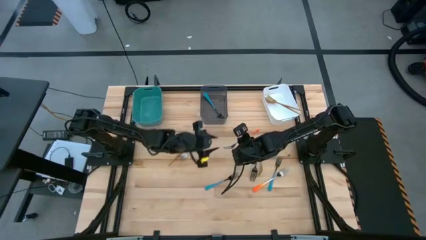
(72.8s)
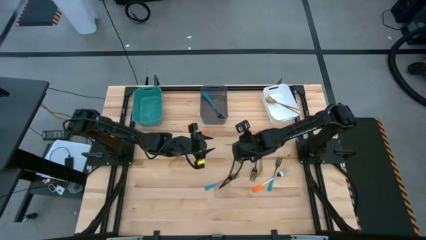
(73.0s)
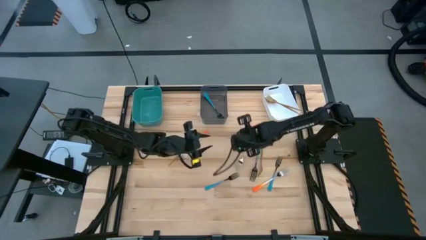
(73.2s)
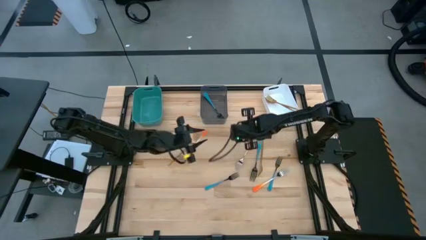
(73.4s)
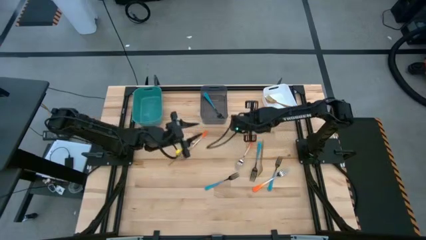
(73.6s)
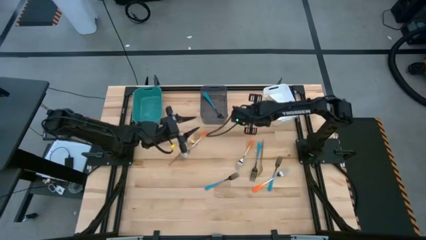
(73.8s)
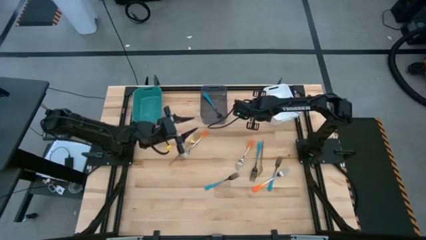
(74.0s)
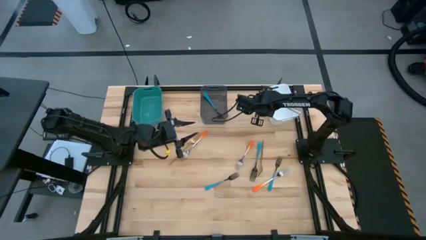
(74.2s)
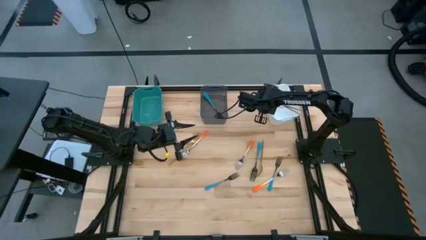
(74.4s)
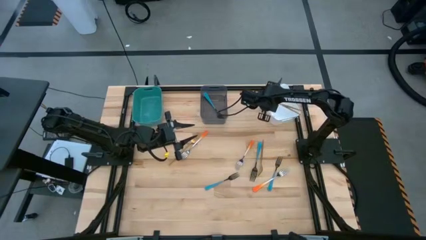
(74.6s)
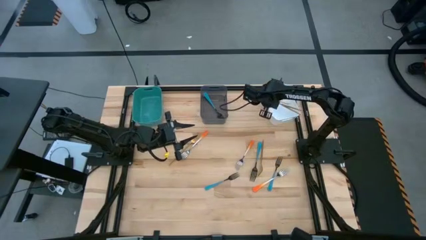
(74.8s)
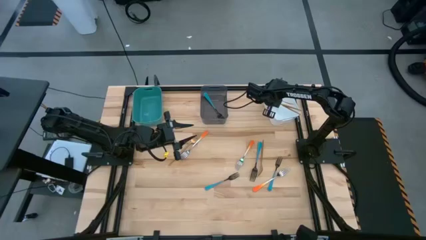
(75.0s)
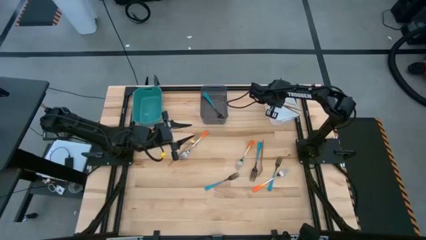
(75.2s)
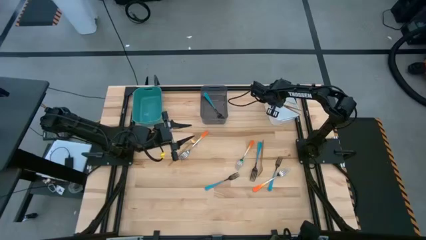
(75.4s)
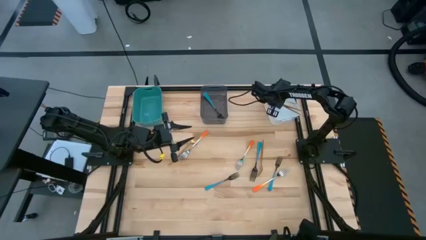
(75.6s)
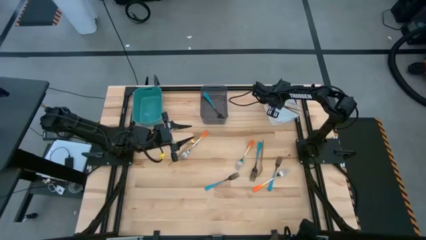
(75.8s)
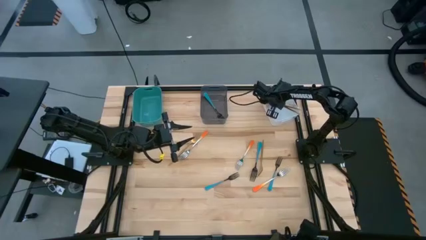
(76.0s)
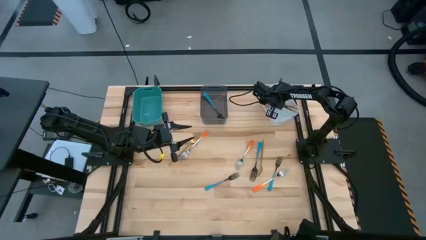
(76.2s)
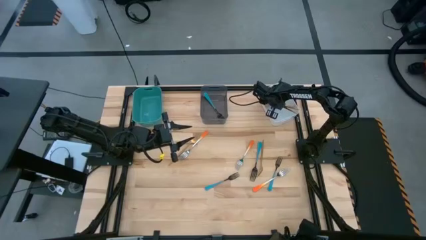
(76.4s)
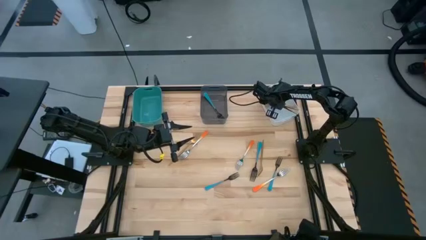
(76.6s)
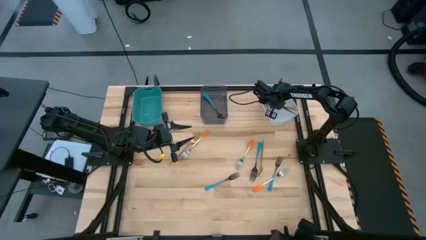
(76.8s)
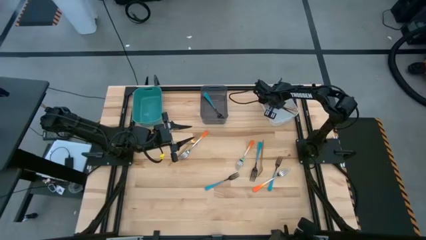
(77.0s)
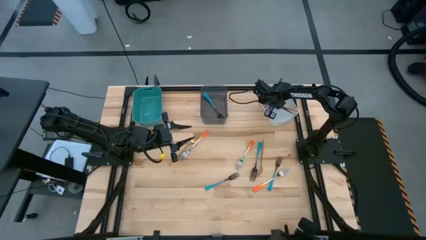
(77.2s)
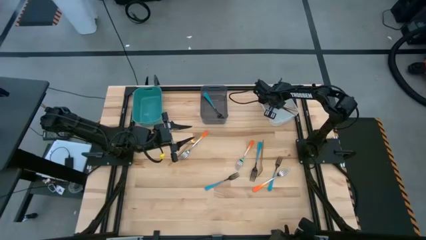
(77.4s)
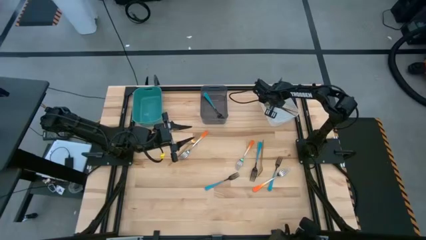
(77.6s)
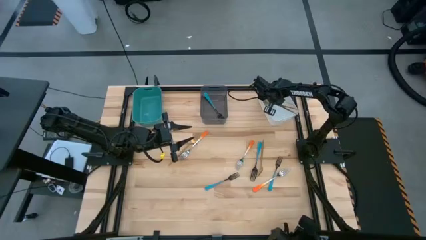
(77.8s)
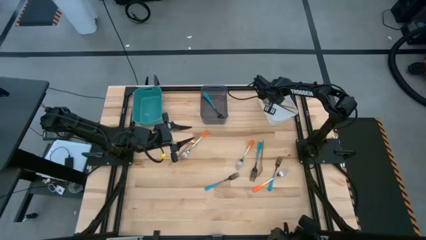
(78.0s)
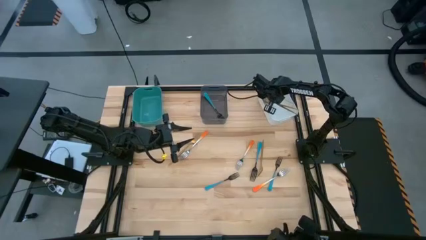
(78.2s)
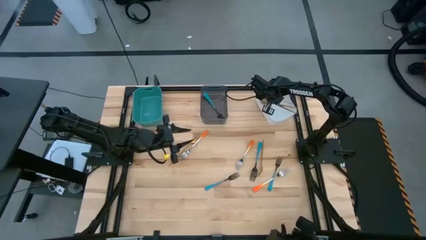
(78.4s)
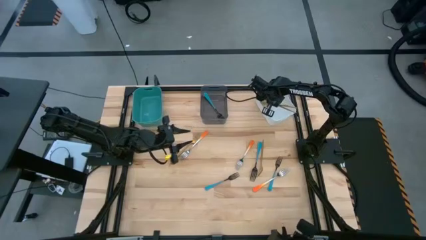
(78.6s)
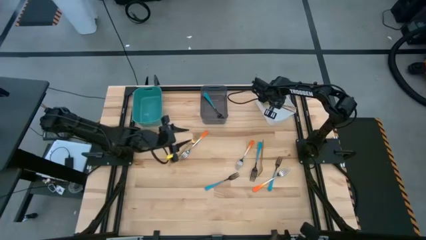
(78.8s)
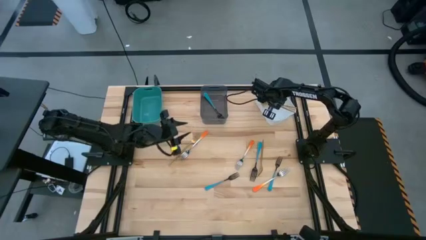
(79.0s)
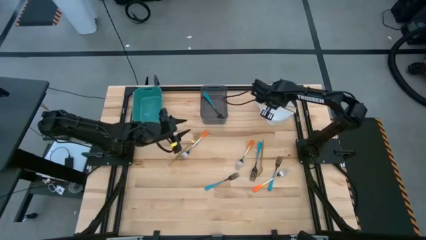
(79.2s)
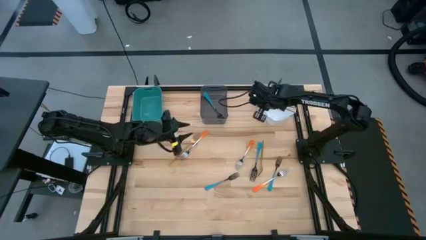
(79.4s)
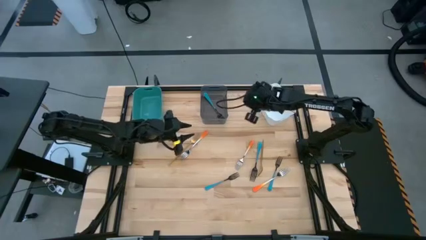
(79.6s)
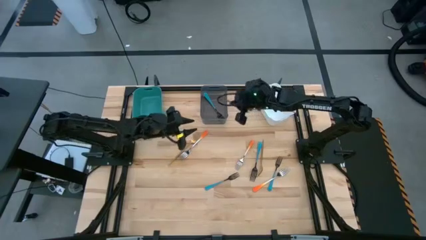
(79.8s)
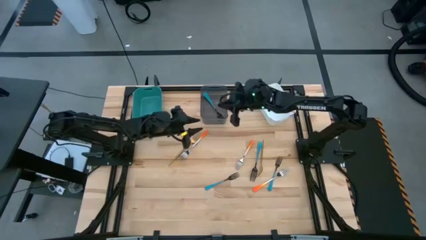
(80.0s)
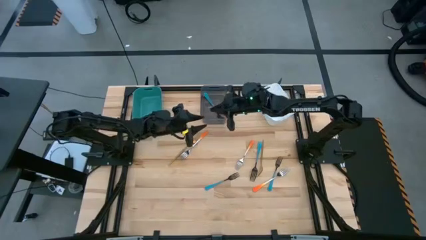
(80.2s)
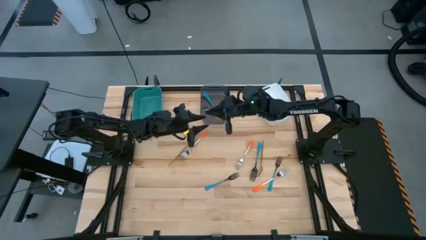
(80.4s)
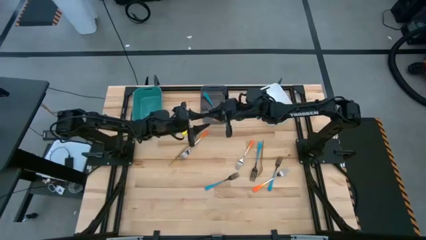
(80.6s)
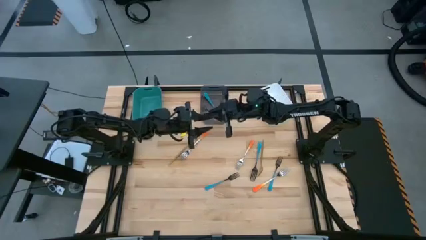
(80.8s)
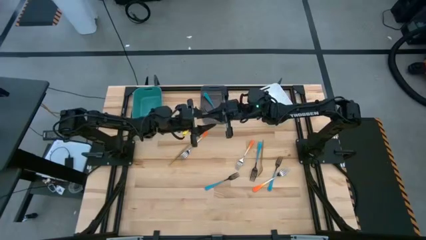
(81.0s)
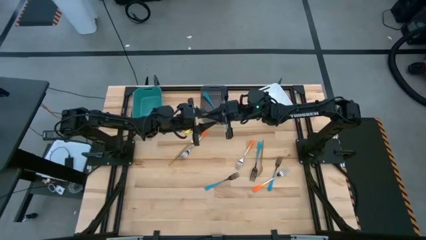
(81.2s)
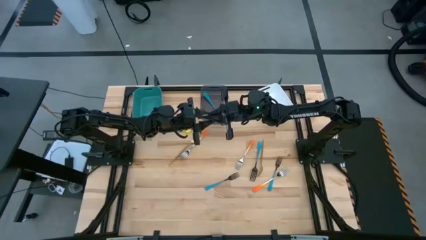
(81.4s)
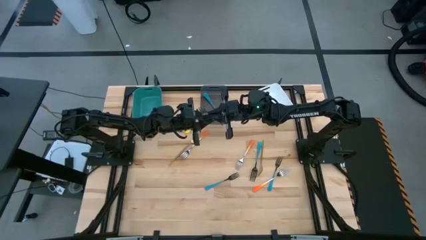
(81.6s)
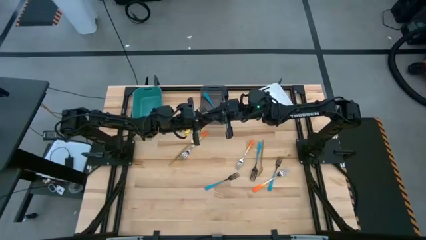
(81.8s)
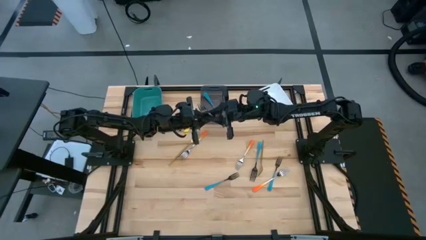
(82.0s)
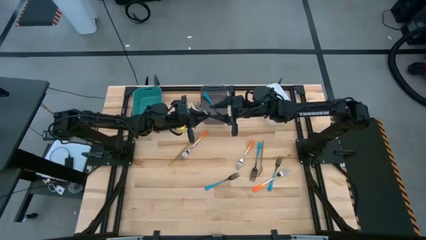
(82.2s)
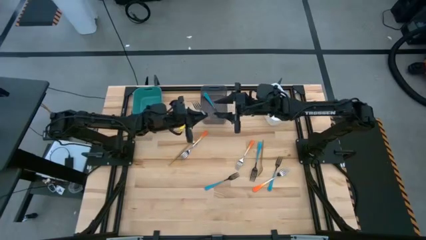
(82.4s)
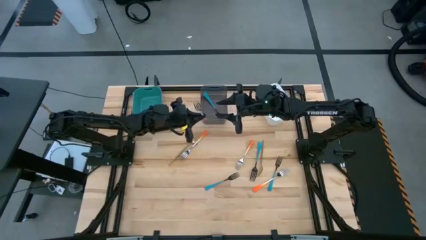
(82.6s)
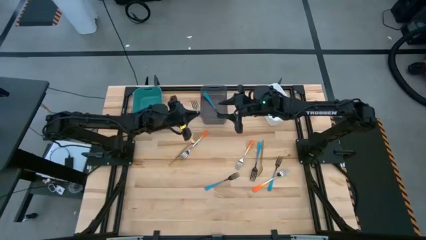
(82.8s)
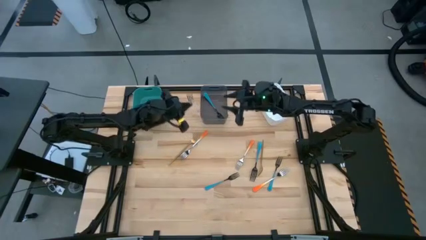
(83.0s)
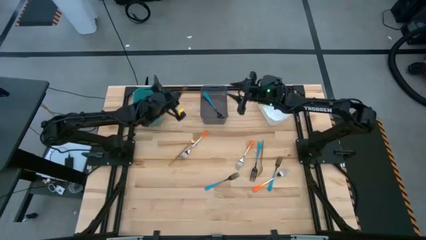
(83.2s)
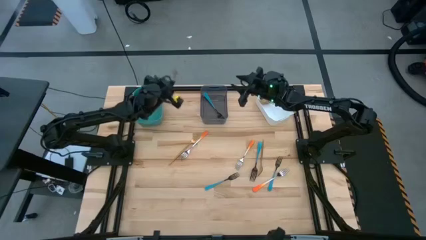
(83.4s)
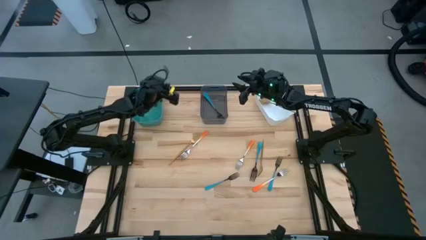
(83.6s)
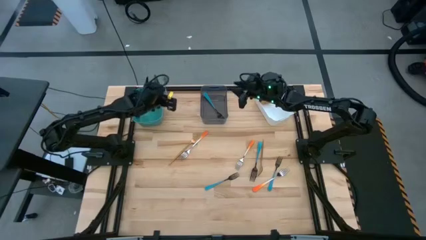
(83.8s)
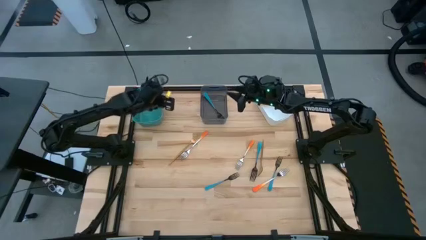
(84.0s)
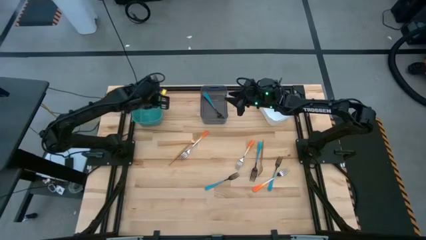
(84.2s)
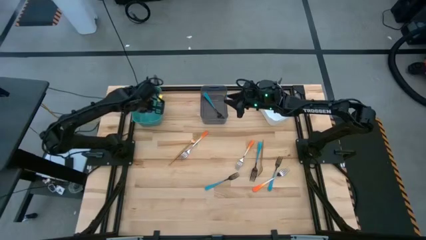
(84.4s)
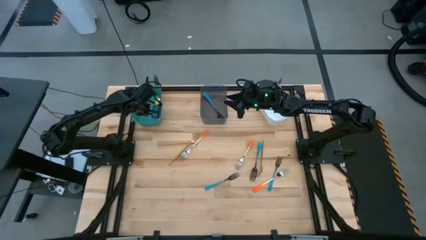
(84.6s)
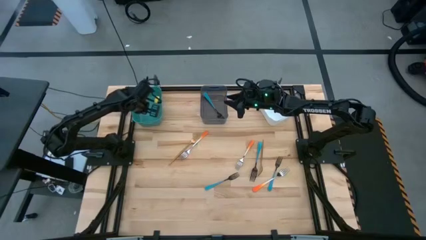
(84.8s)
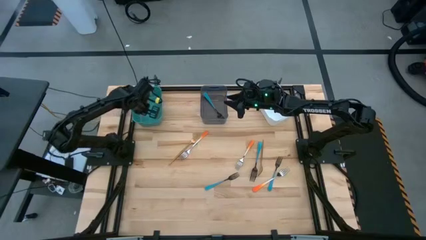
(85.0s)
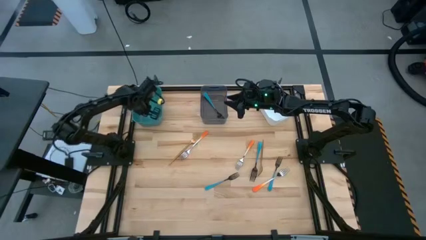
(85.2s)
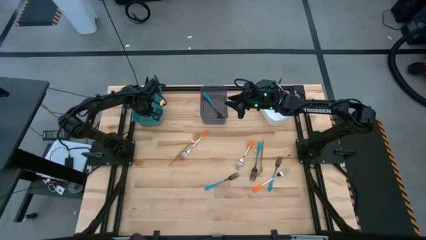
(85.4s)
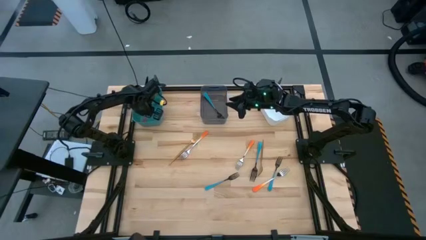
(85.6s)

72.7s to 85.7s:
Task: Sort silverware by color (type)
Put the bottom left orange fork into the green bin

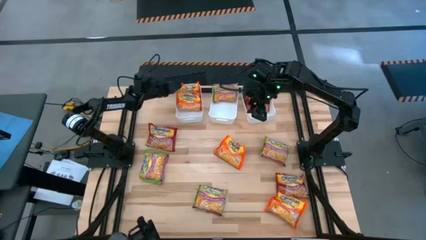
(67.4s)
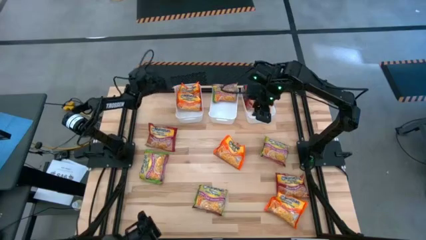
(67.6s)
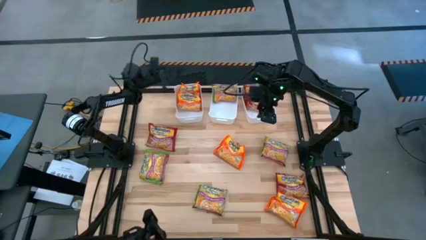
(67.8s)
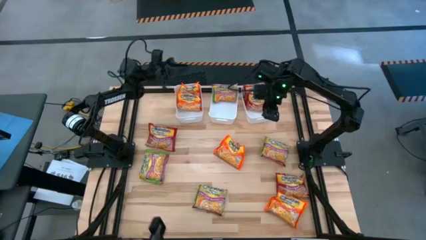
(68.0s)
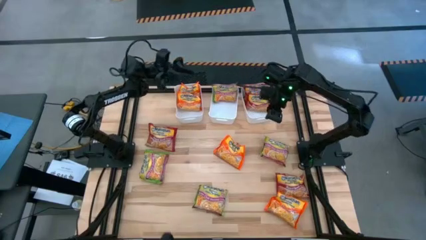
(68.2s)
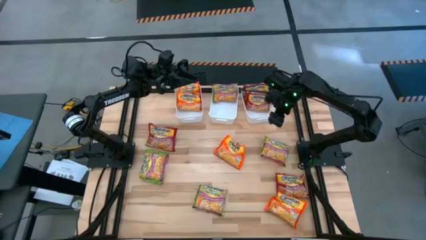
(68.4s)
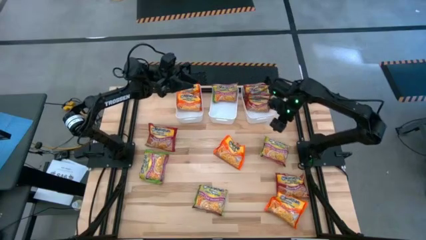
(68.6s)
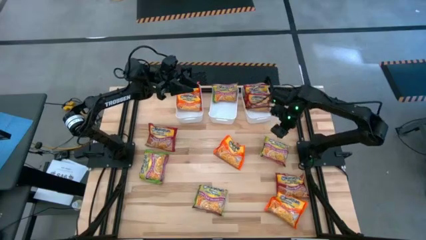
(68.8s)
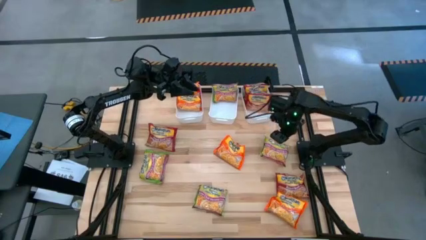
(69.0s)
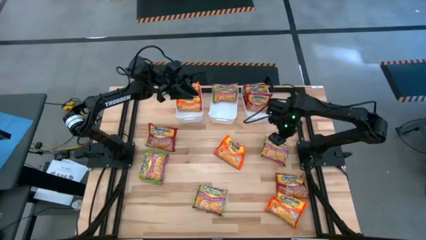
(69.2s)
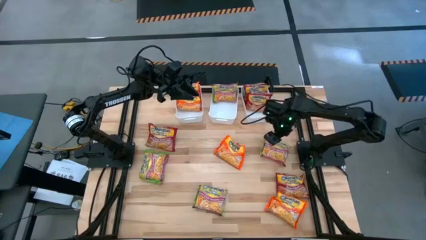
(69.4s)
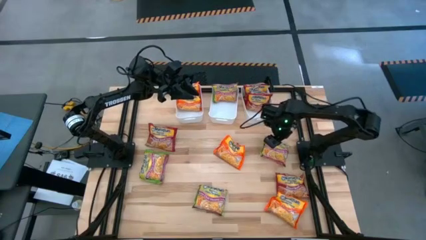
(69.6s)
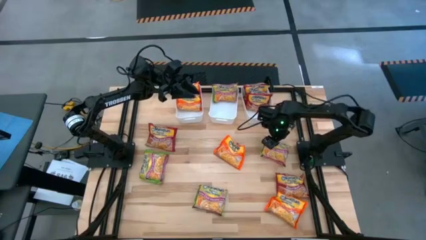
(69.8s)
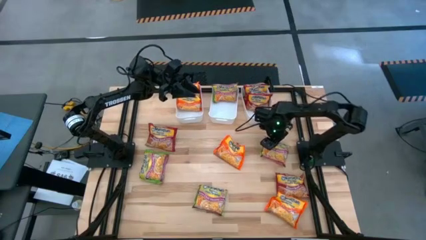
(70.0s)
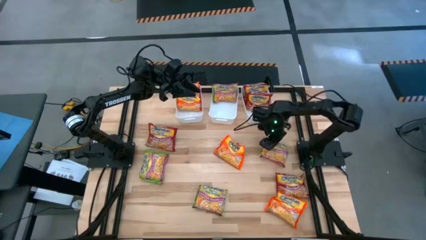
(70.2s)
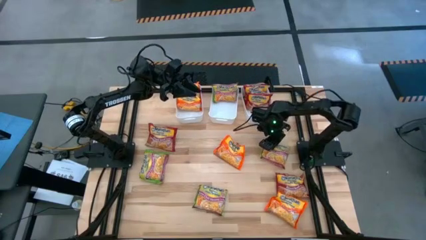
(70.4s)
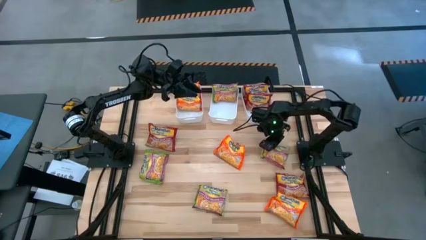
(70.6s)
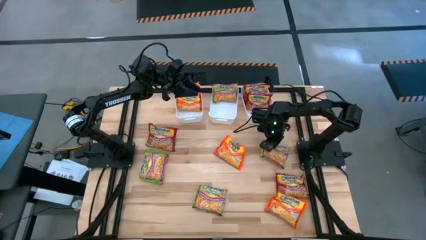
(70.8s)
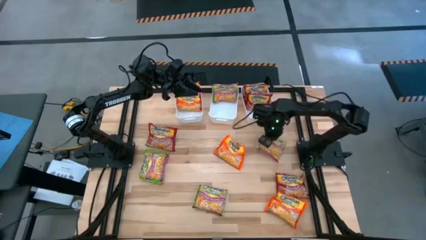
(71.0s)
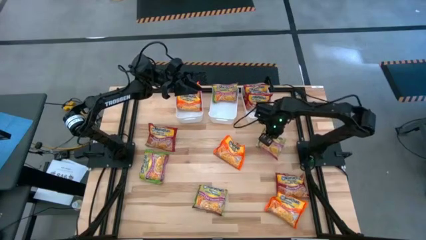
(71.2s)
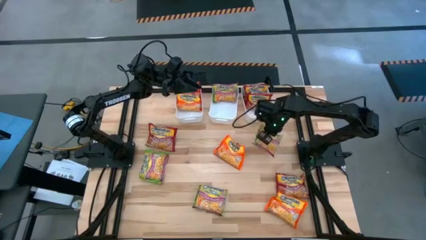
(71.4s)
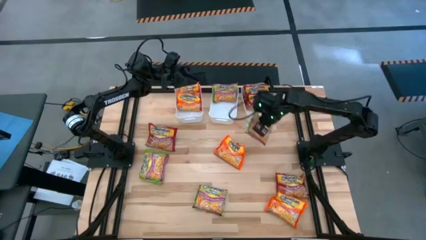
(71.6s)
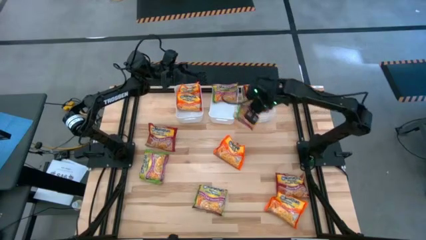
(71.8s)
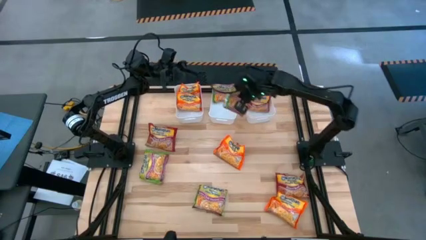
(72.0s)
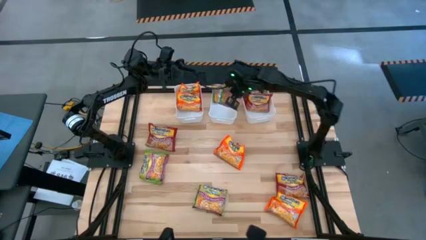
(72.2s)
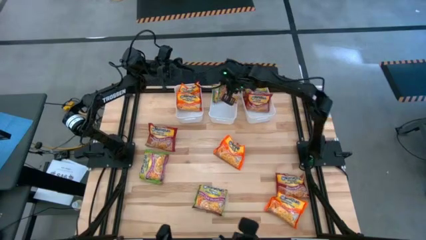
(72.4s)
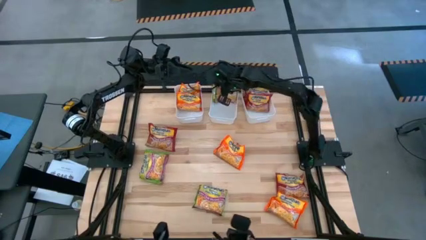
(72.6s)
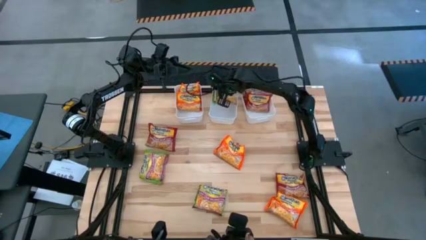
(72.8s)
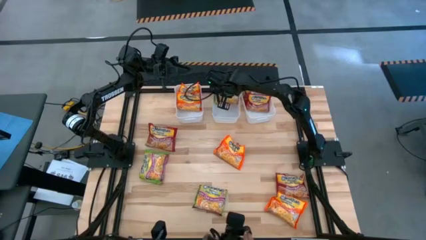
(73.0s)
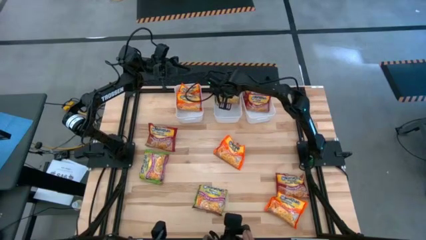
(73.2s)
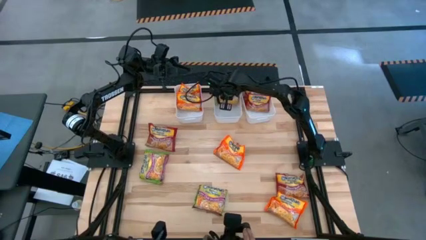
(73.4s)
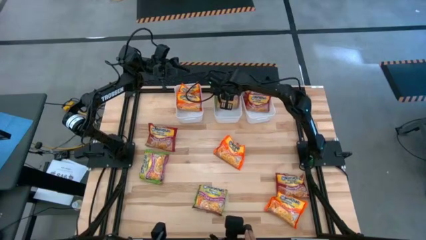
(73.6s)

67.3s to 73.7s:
Task: Sort Maruchan noodles
Put the green noodle pack into the center white bin
